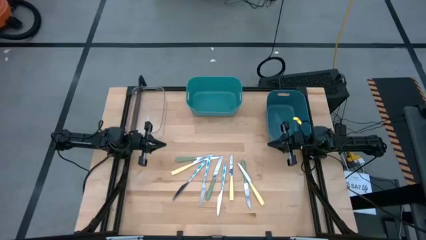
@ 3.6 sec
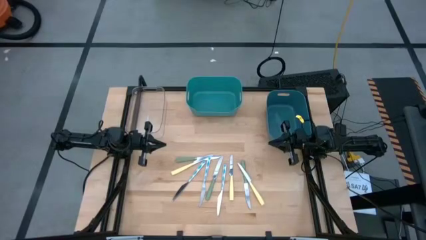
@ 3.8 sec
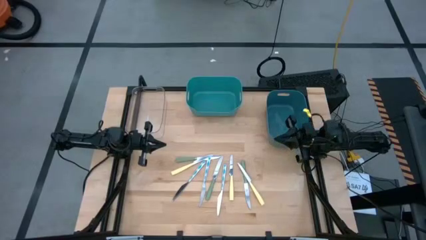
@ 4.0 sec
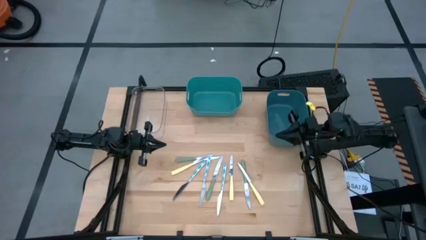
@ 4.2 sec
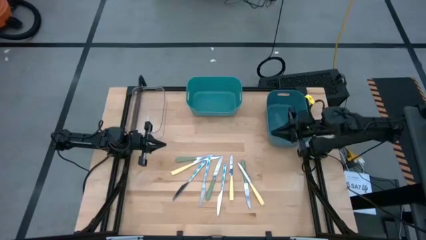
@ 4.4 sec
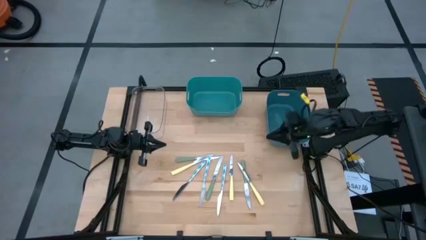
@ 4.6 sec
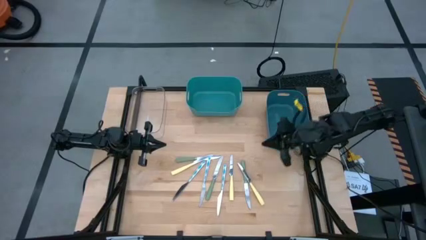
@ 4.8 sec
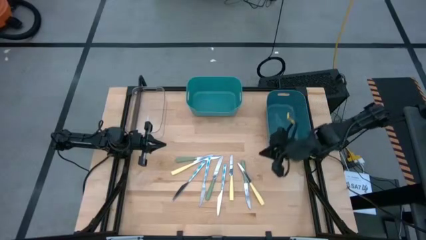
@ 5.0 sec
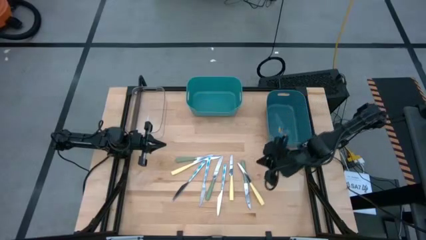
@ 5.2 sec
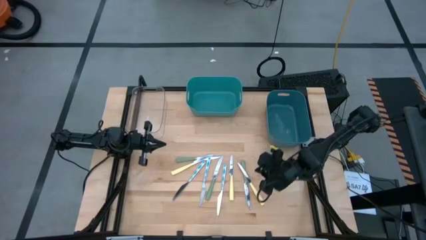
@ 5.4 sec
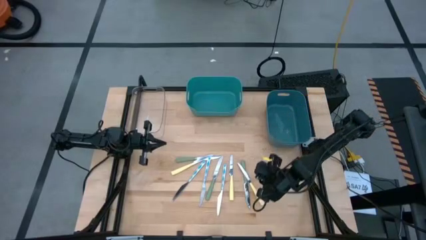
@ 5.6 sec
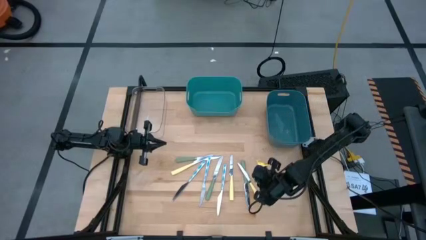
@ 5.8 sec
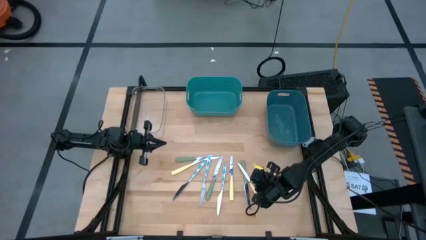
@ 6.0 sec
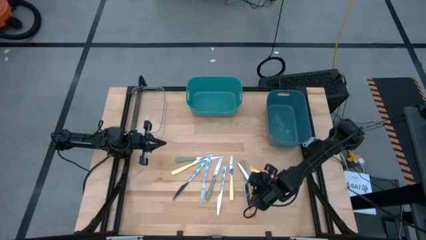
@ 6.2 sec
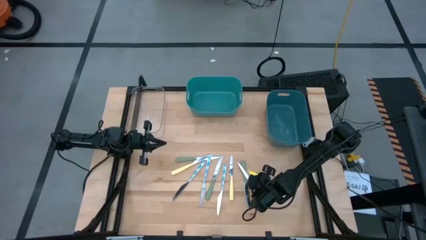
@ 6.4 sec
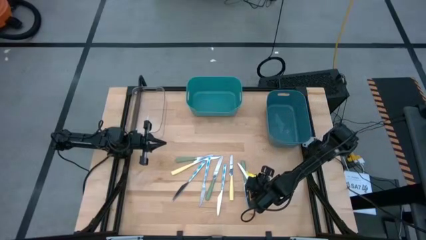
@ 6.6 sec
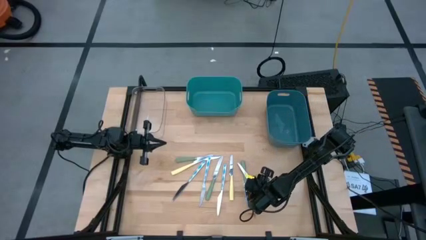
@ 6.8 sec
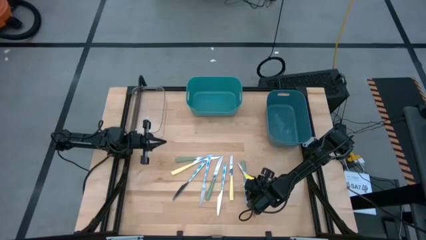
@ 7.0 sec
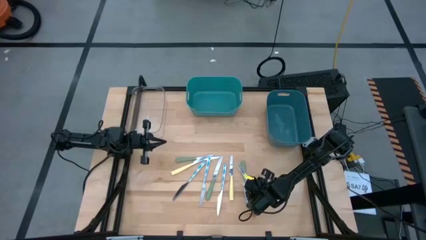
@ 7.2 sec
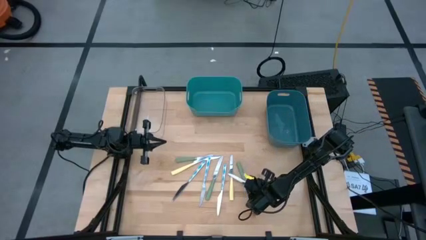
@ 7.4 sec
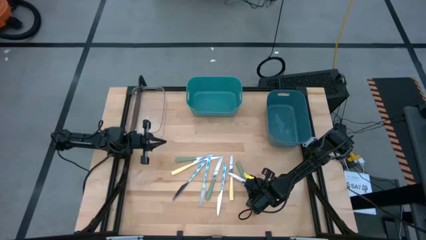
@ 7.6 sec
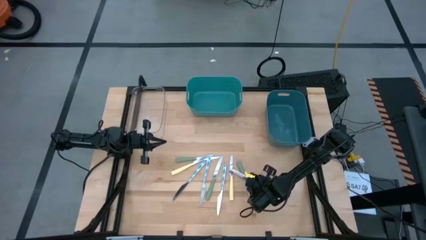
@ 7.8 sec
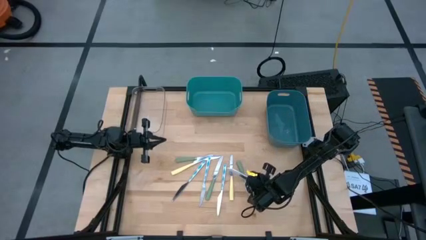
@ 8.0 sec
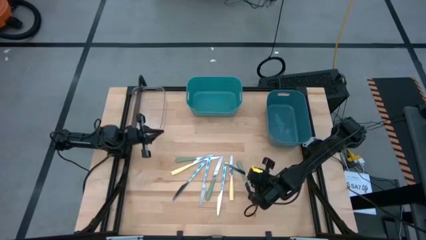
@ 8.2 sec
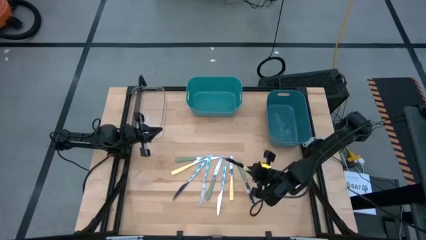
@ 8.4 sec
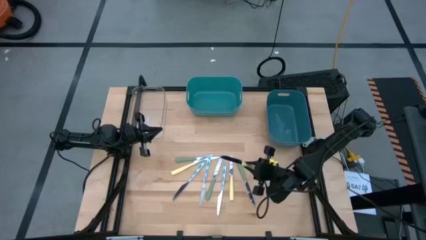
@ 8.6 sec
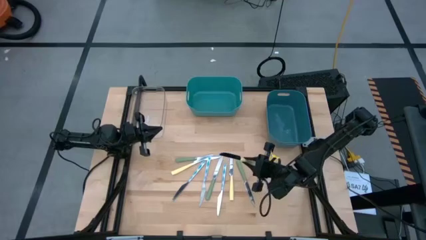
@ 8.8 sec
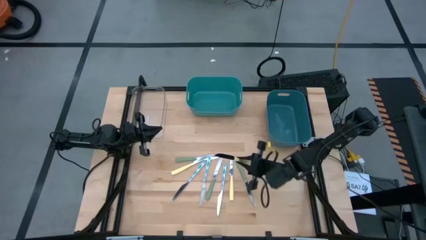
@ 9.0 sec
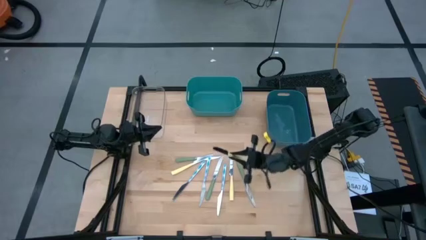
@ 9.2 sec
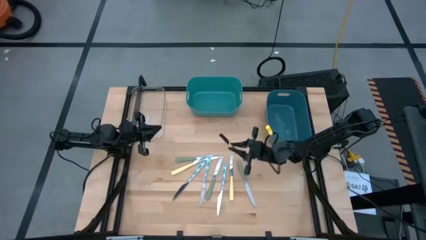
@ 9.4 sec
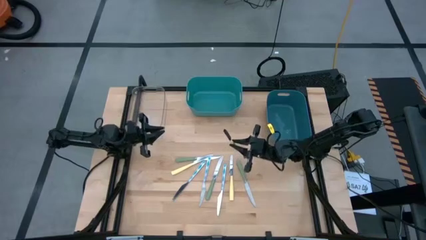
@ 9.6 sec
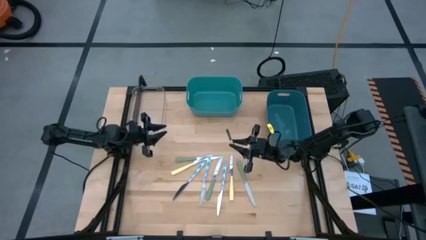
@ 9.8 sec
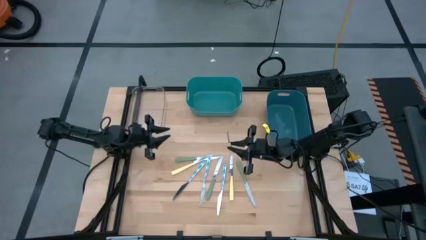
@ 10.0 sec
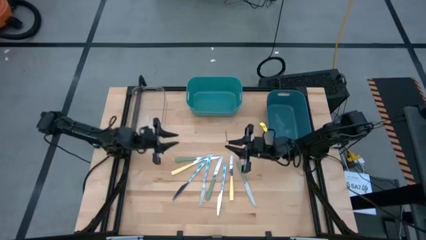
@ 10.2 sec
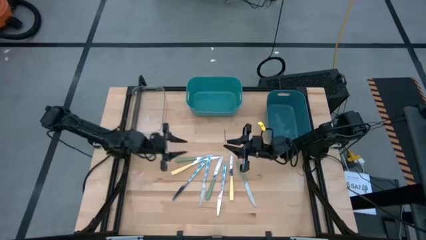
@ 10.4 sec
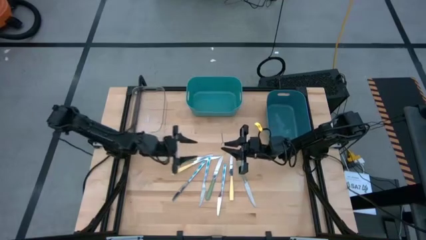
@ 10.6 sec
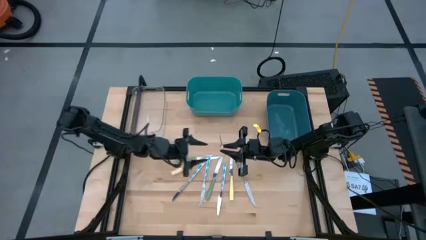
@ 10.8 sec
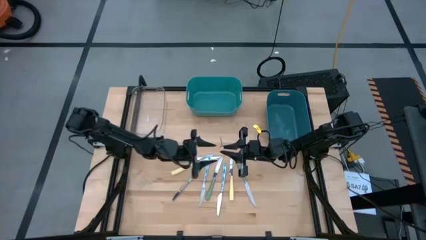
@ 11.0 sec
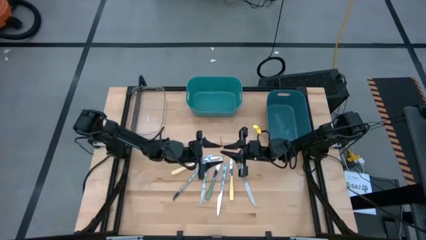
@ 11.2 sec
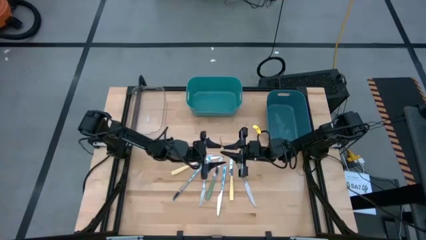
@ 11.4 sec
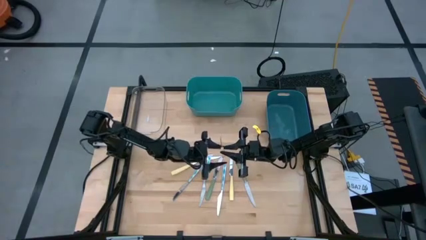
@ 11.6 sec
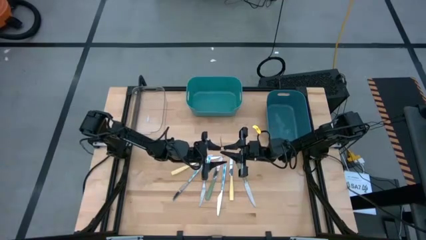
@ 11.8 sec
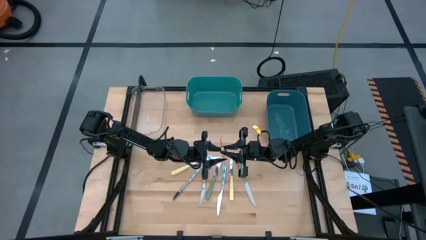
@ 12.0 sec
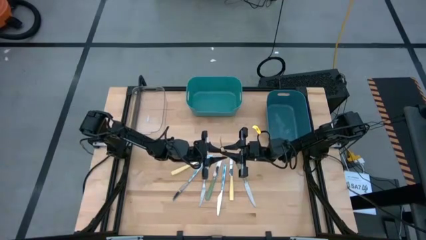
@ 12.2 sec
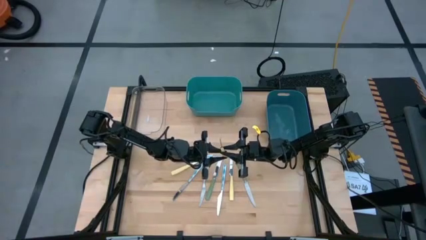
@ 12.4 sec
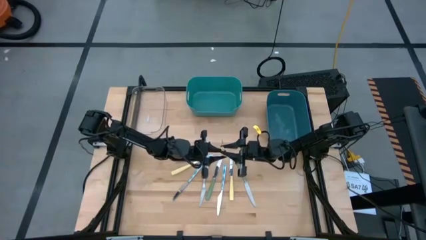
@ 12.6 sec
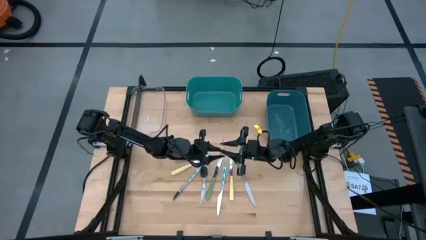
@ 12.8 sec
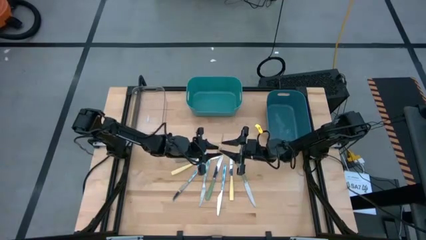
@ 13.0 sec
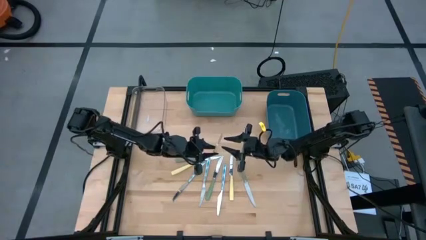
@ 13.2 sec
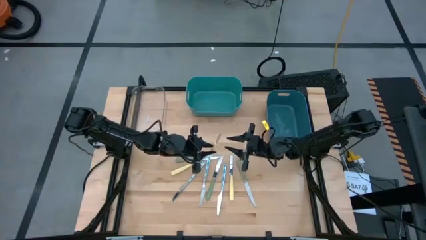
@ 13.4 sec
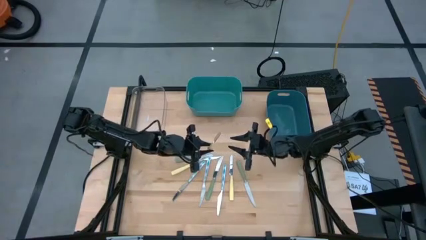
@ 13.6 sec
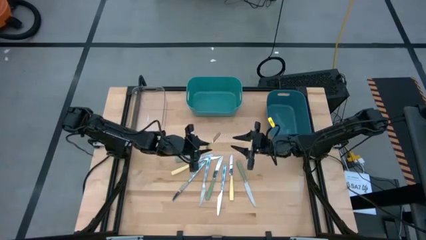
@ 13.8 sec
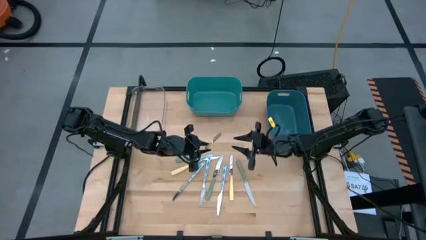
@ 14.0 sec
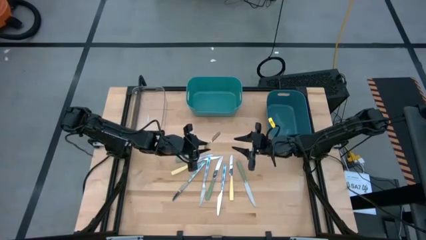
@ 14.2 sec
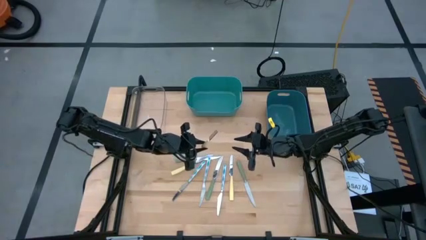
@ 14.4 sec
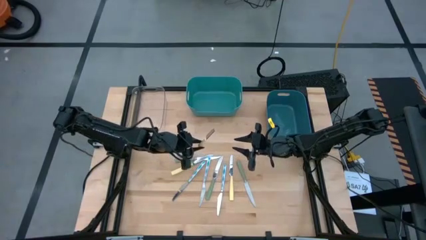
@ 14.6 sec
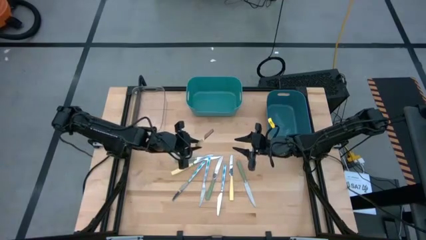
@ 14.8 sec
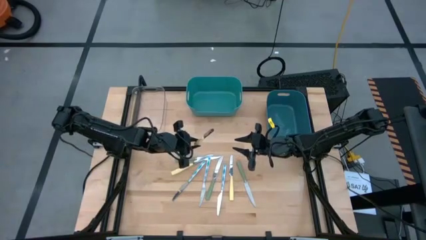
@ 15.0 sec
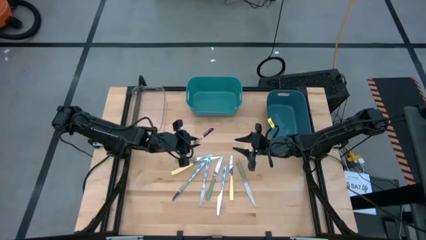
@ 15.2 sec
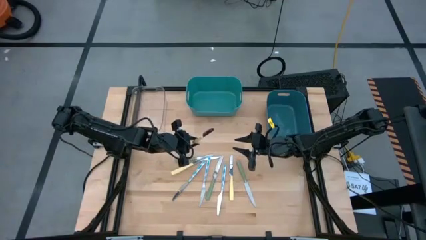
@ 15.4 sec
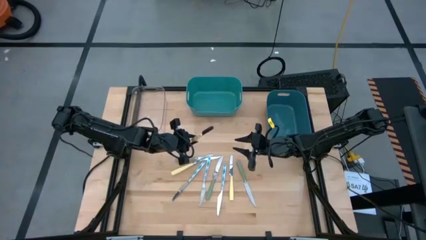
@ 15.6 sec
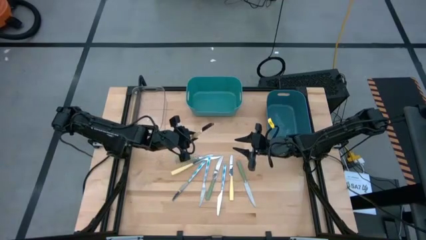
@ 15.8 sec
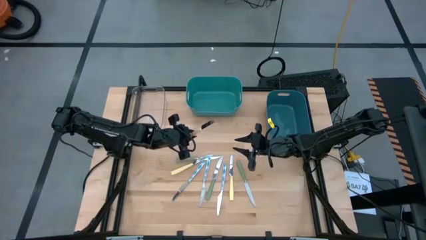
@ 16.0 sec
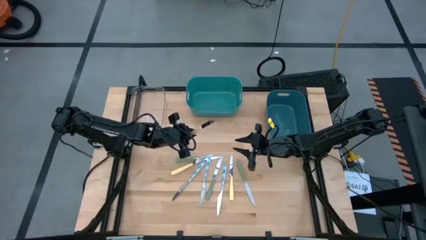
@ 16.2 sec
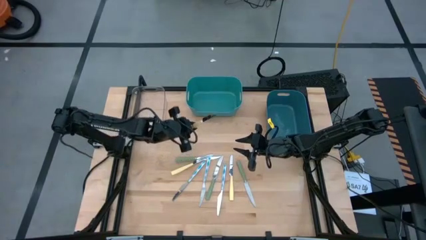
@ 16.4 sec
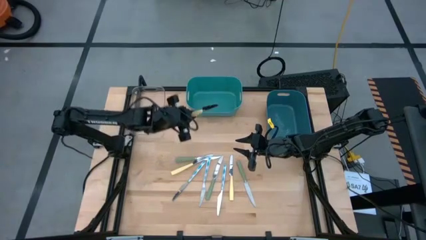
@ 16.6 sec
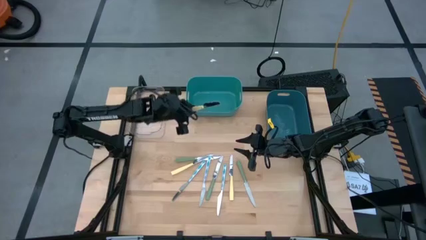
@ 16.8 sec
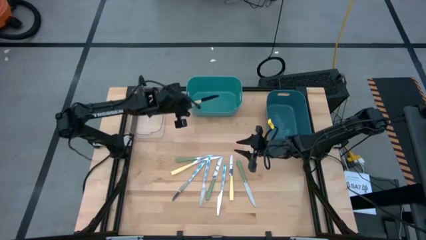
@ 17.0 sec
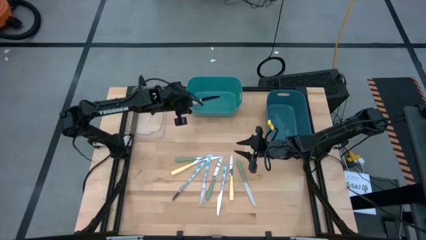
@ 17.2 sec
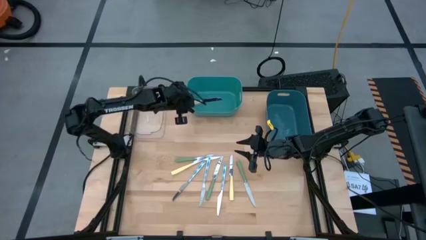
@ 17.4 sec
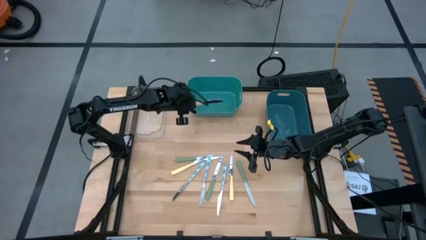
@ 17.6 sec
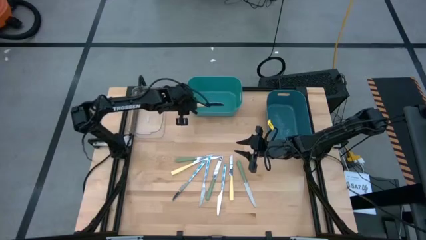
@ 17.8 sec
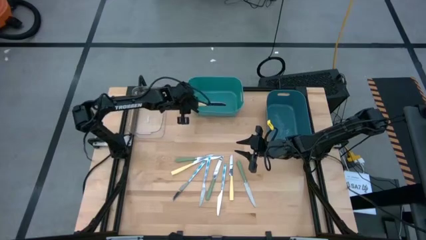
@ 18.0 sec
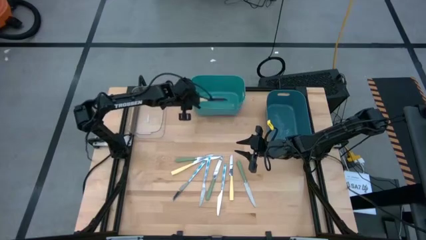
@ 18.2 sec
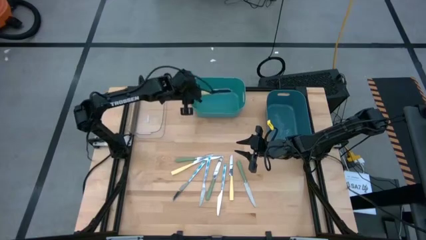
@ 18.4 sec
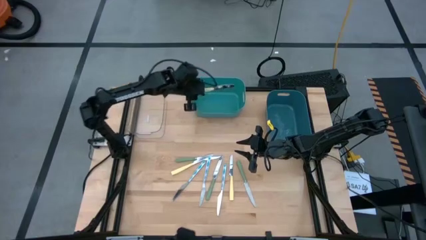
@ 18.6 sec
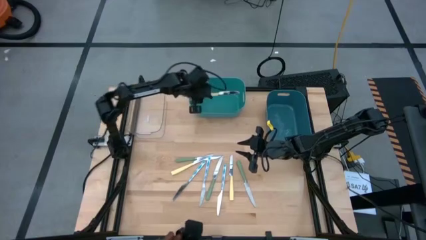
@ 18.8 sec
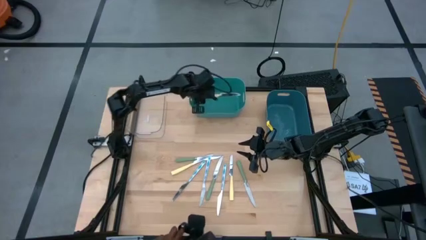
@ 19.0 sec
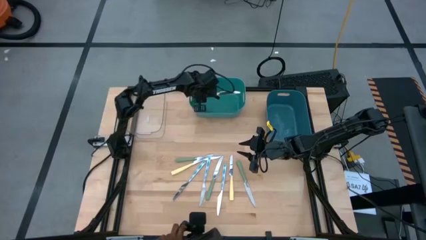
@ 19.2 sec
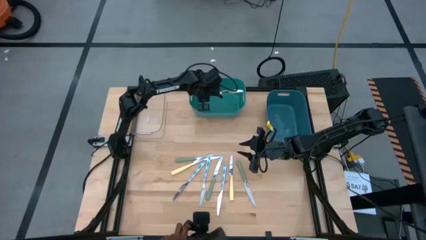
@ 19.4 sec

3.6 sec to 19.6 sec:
Task: Sort silverware by color (type)
Put the right yellow knife into the green bin
